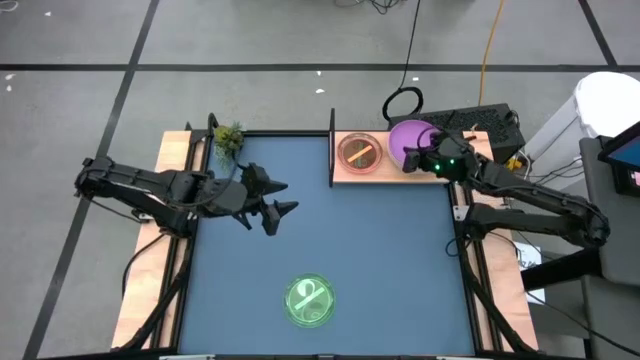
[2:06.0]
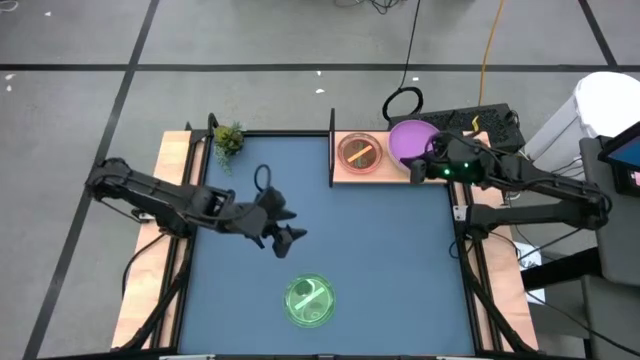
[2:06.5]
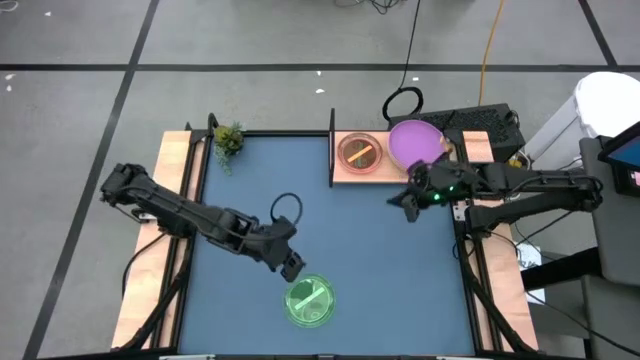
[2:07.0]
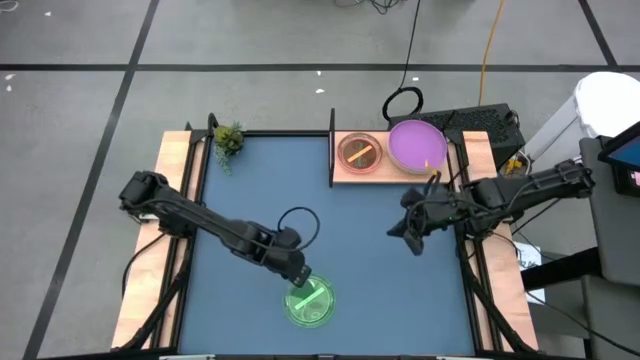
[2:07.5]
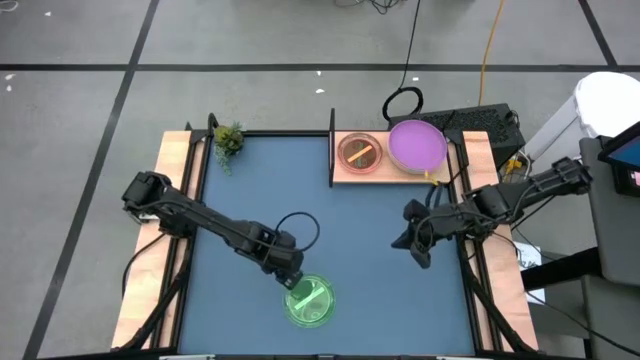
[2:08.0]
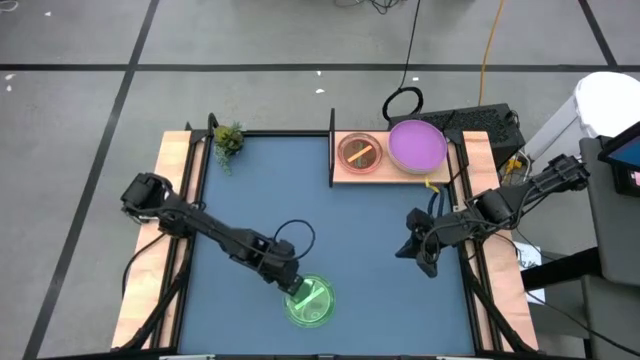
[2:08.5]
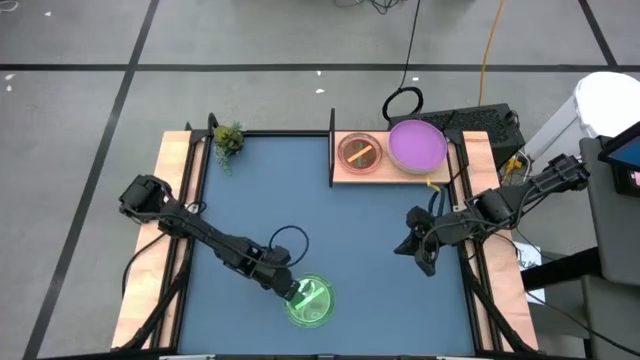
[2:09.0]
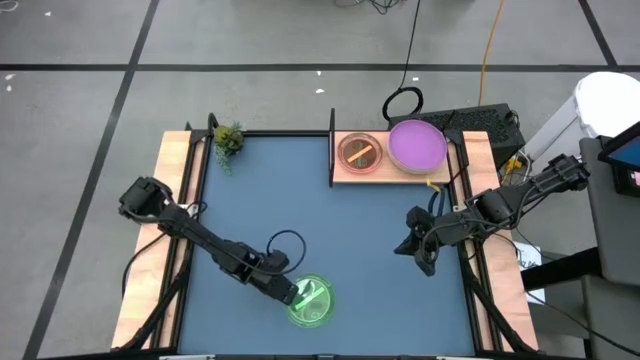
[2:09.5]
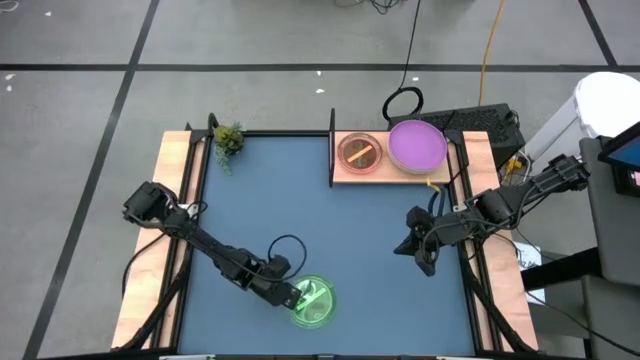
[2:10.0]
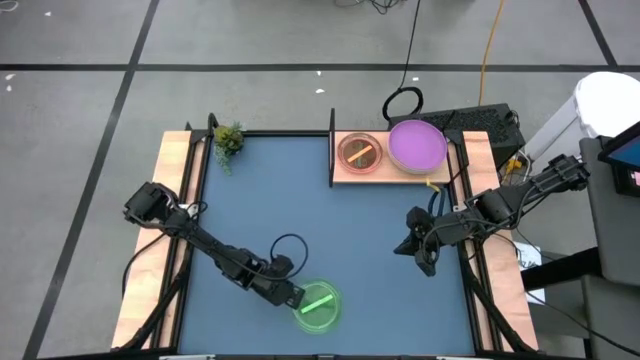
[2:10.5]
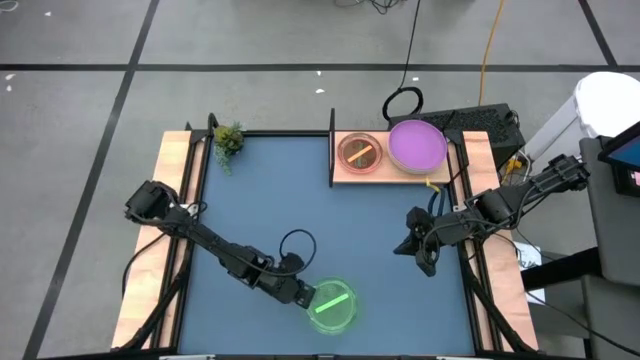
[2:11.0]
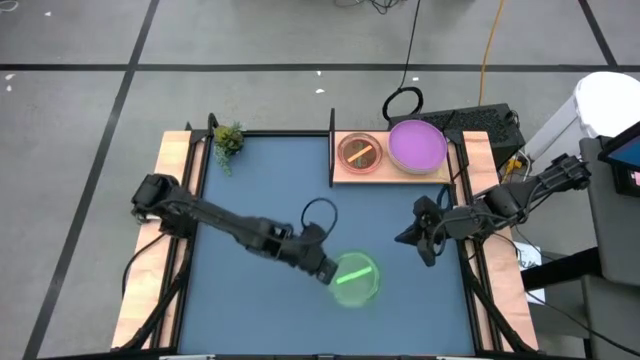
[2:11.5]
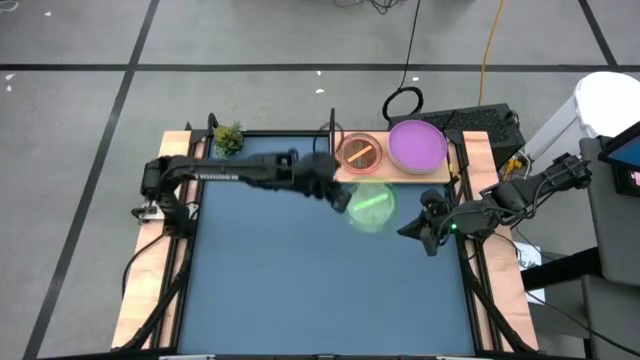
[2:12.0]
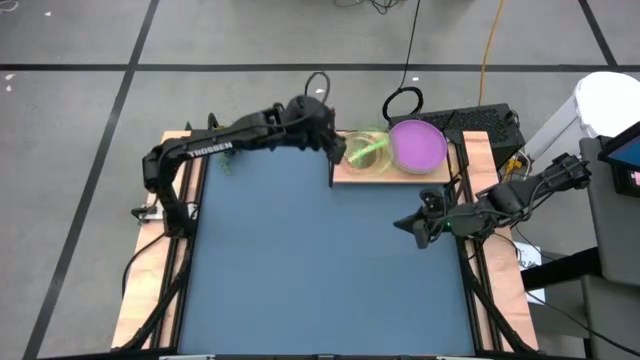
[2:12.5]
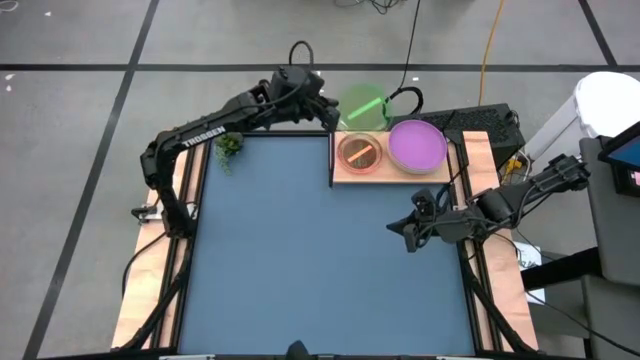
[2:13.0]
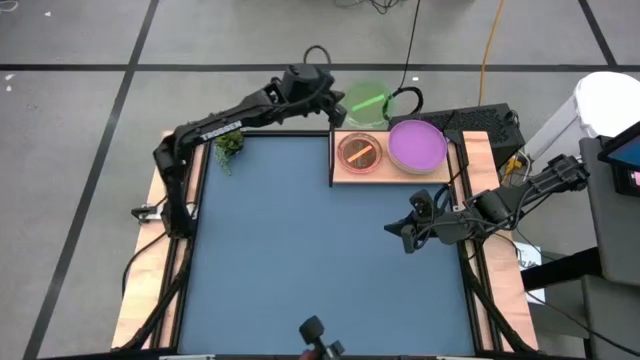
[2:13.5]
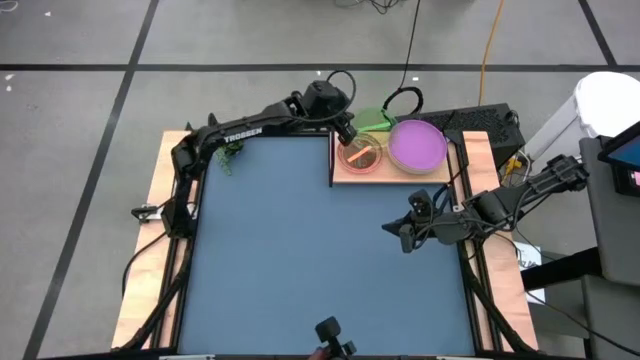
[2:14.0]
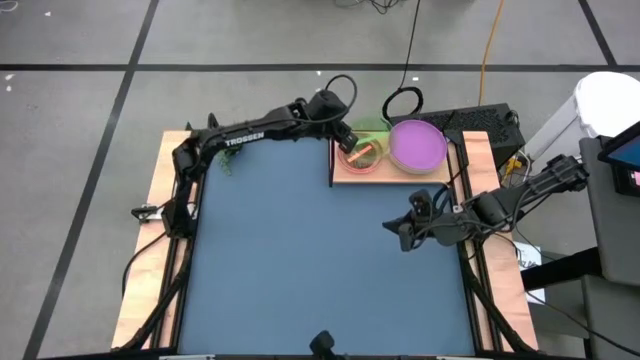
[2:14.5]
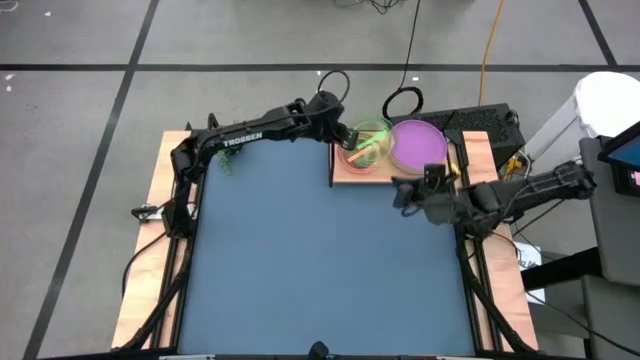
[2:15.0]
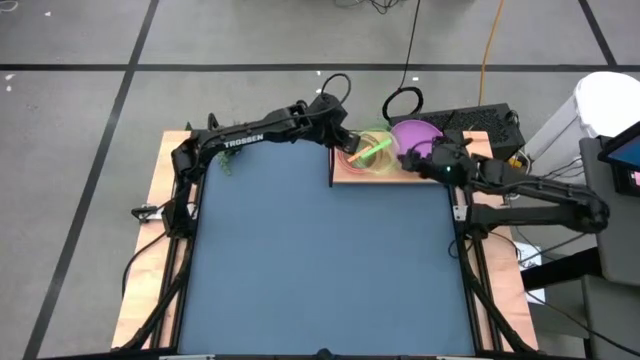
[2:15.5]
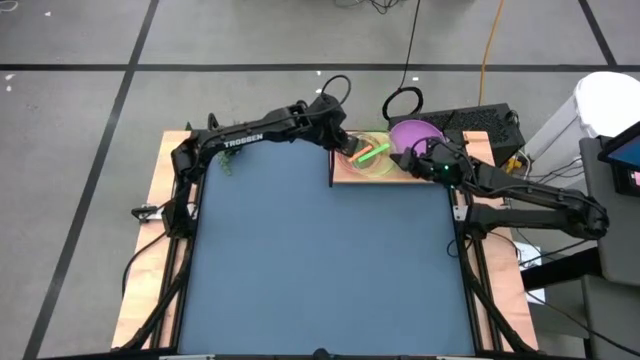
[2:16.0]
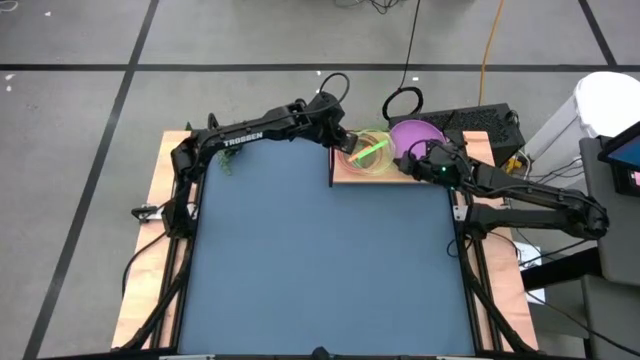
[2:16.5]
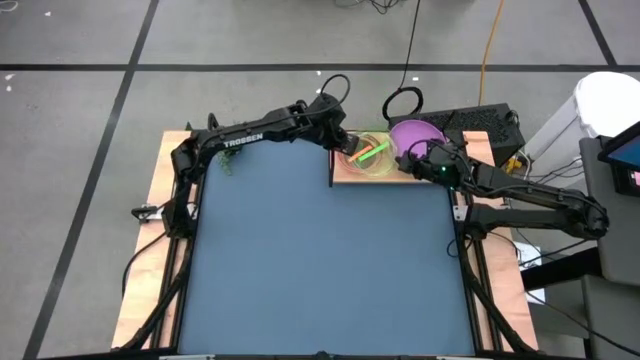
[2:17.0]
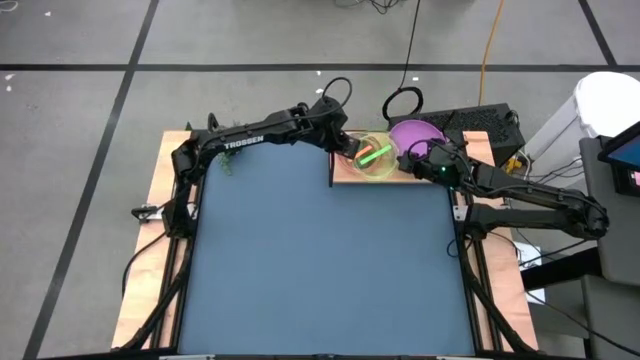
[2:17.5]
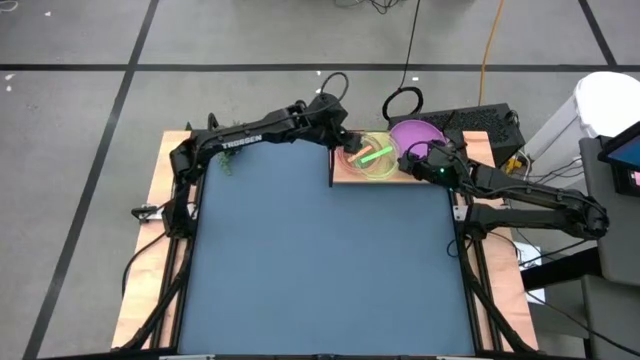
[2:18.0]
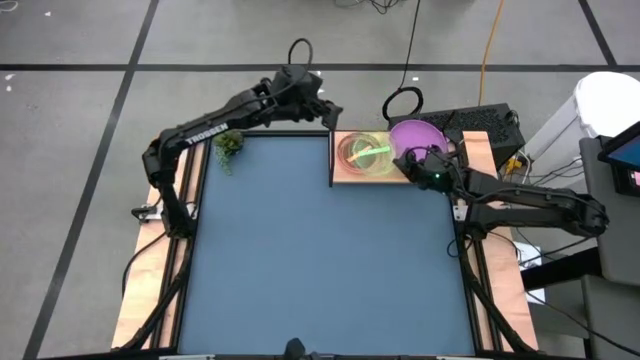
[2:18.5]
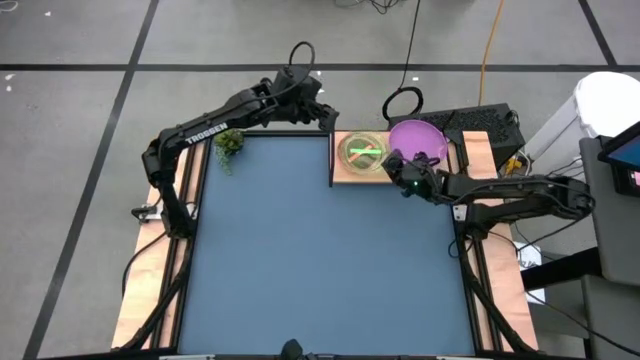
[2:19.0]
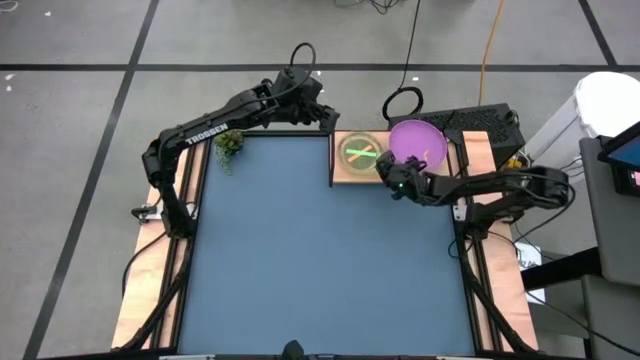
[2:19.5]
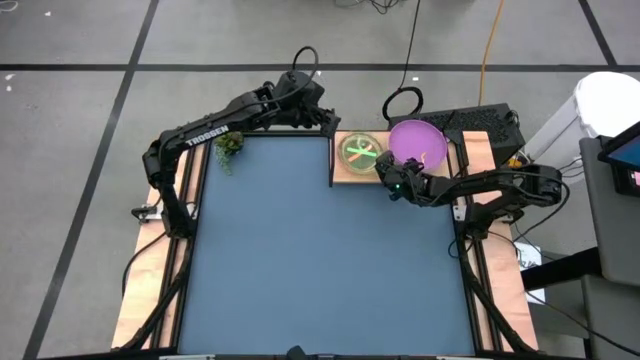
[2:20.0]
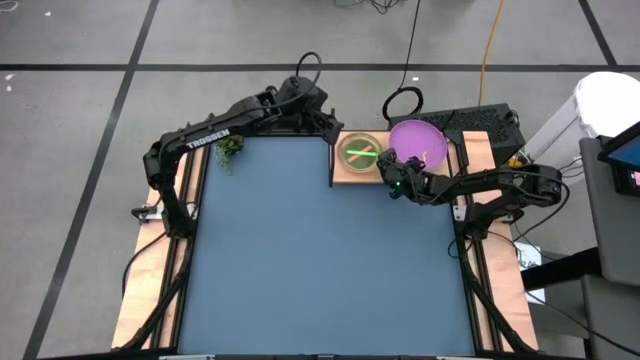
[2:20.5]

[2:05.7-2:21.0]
Task: Place and stack plates onto a shelf
Stack the transparent green plate on the transparent orange plate on the shelf

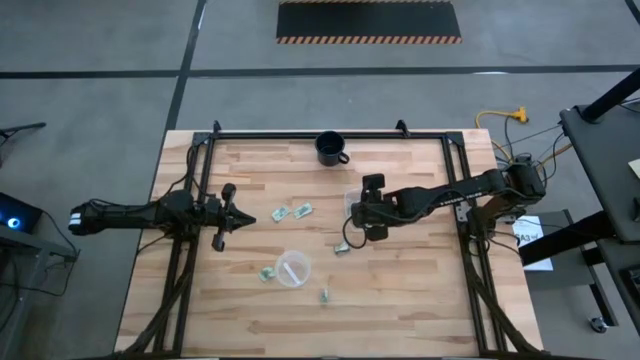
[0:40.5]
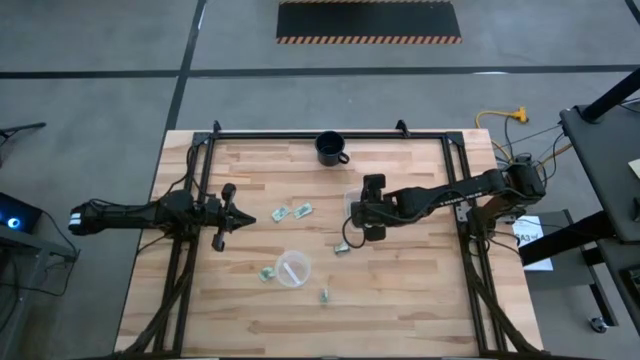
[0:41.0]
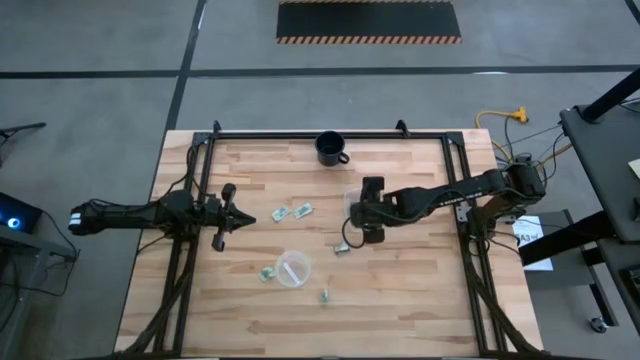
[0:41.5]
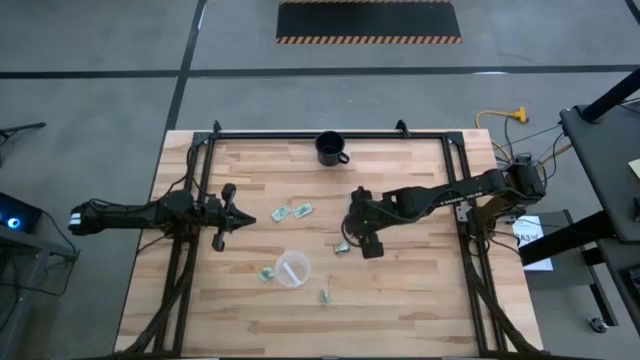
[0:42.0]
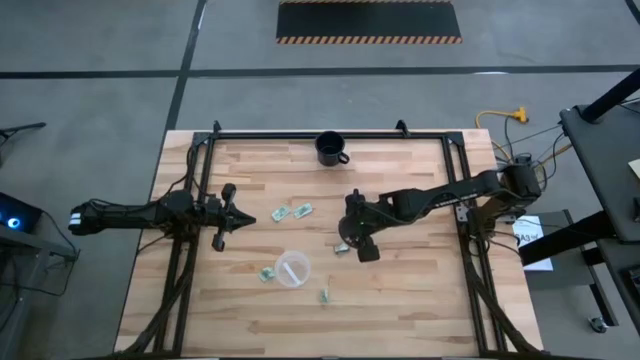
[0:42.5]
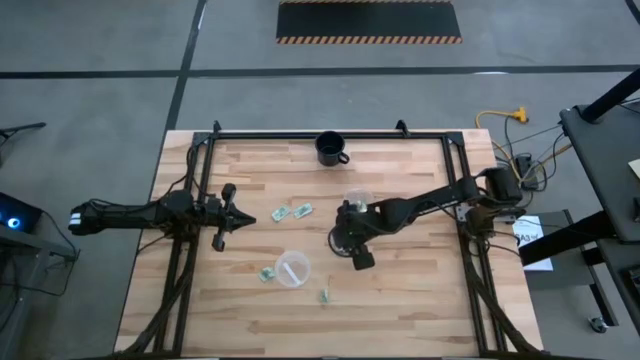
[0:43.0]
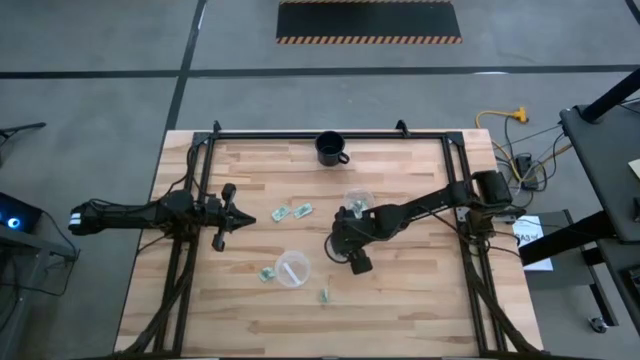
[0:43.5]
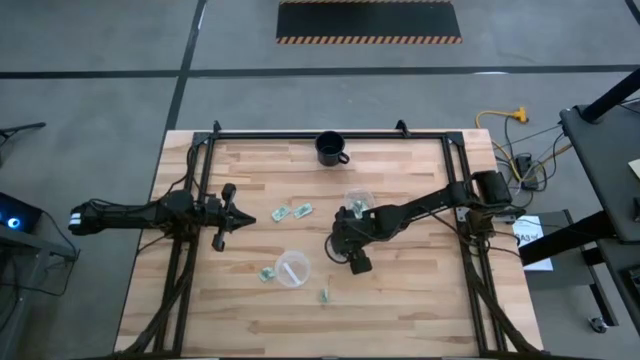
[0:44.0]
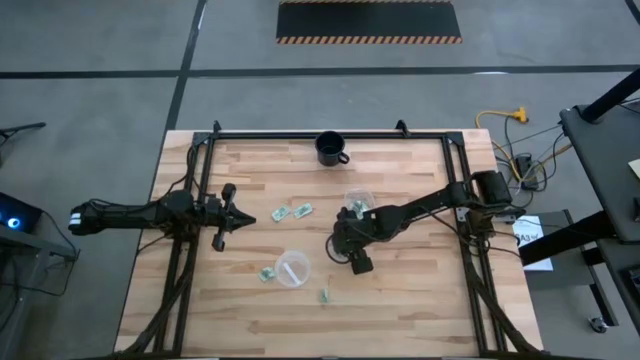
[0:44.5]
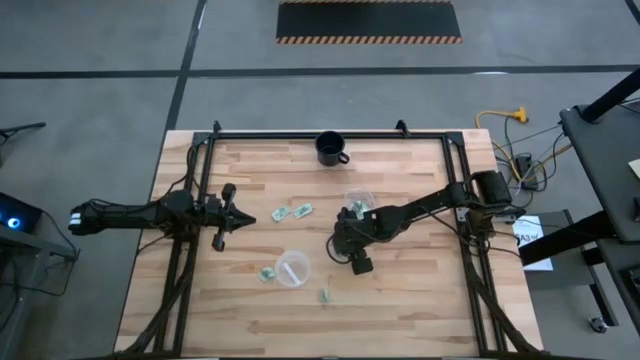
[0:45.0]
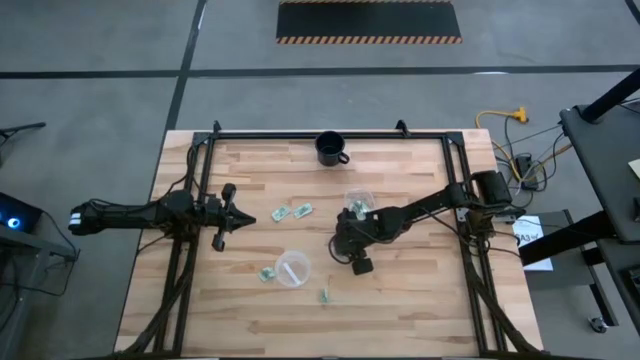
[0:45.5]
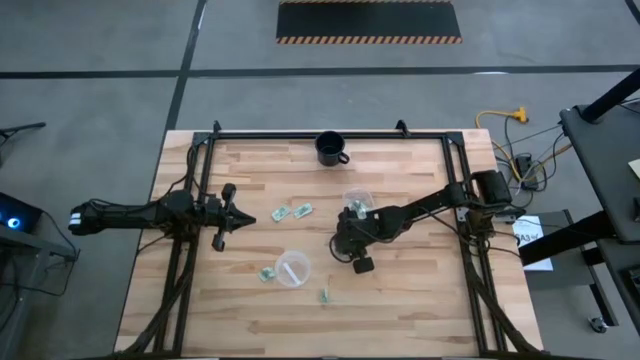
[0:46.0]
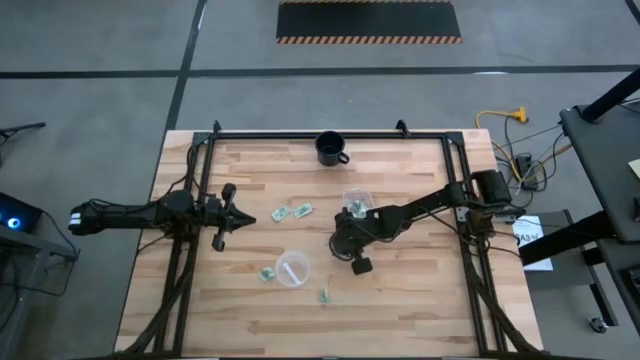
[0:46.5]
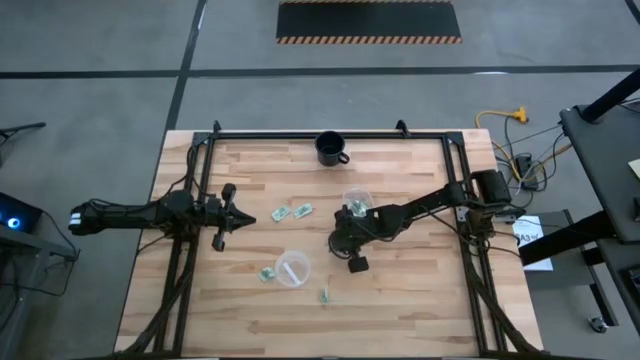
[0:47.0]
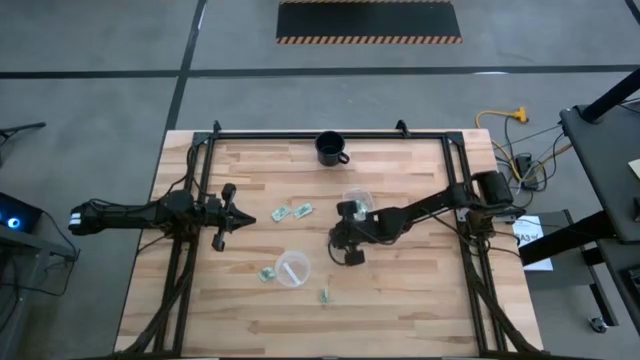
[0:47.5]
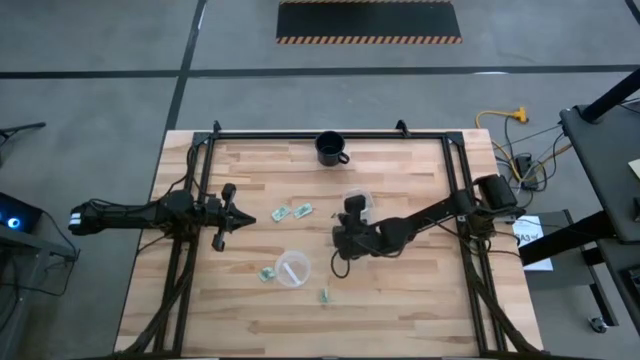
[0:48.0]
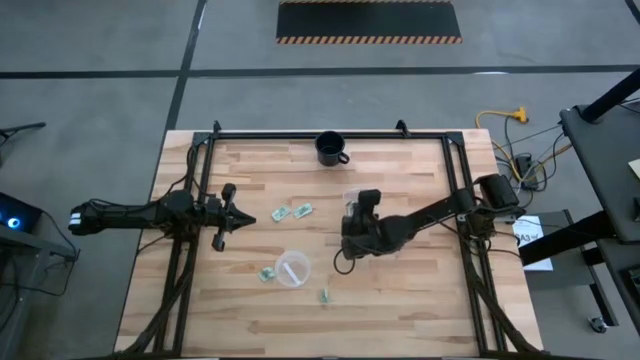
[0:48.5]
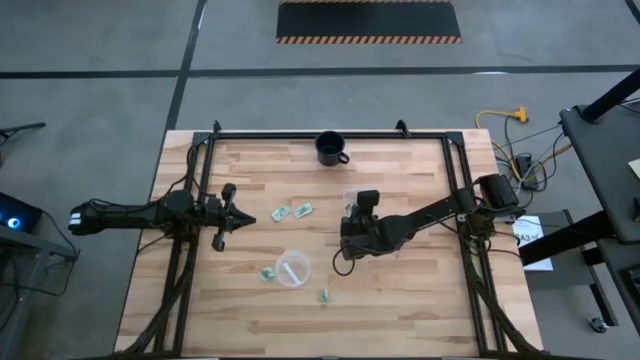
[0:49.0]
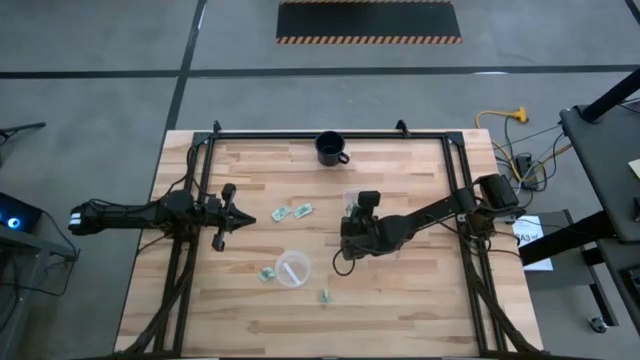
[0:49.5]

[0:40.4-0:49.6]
Task: Pick and place items into bin
Put the green stevia packet into the right transparent bin
